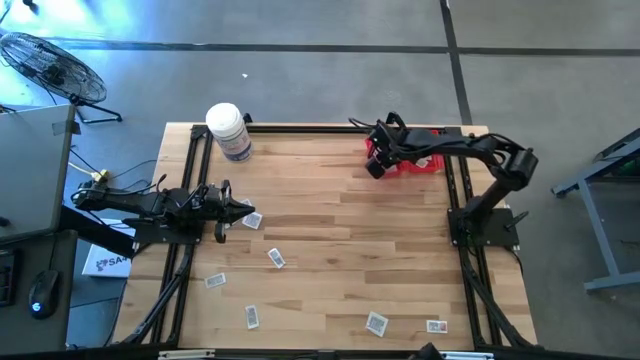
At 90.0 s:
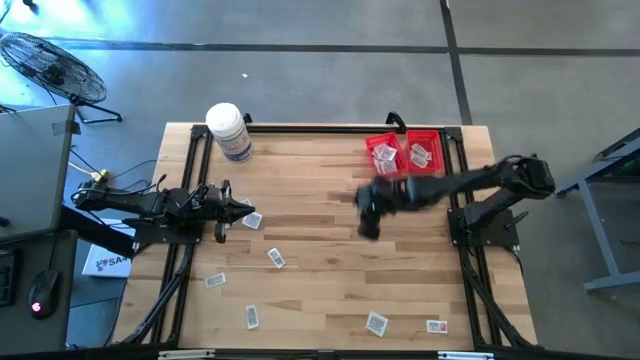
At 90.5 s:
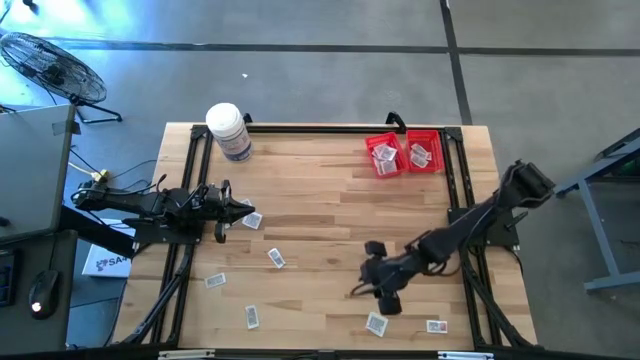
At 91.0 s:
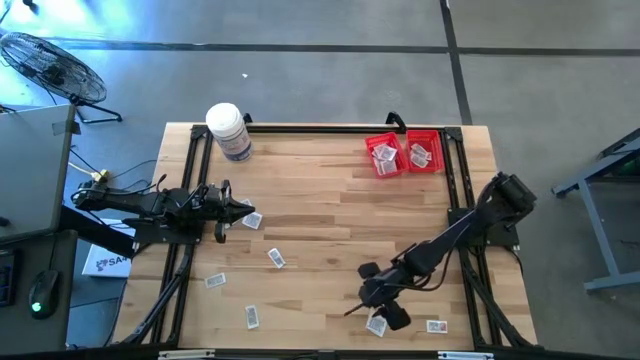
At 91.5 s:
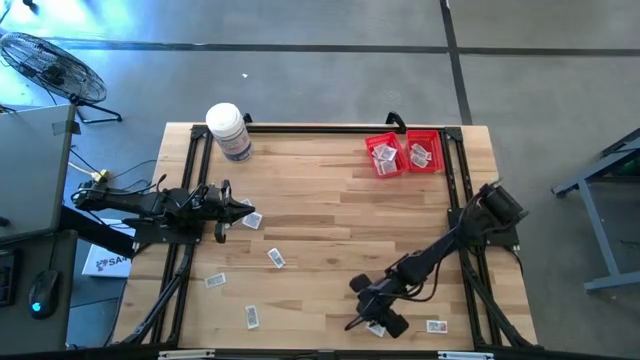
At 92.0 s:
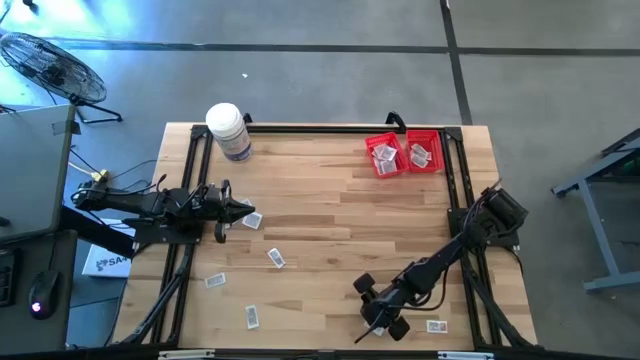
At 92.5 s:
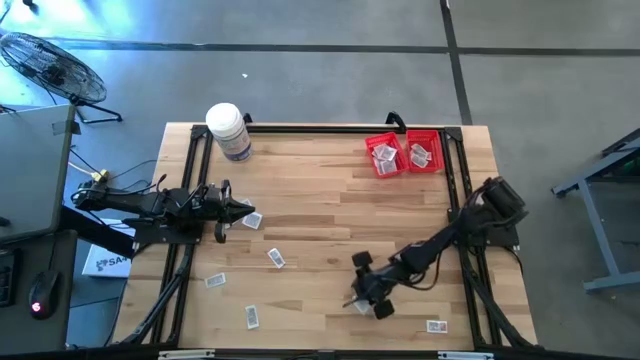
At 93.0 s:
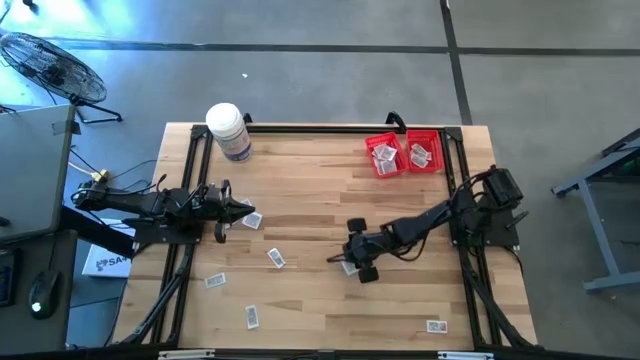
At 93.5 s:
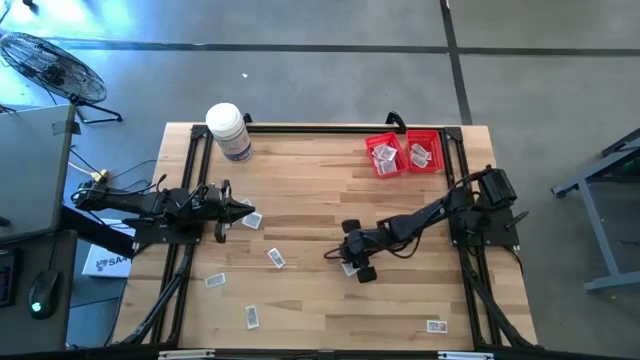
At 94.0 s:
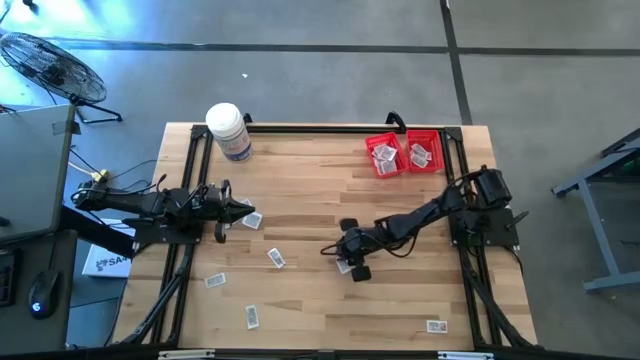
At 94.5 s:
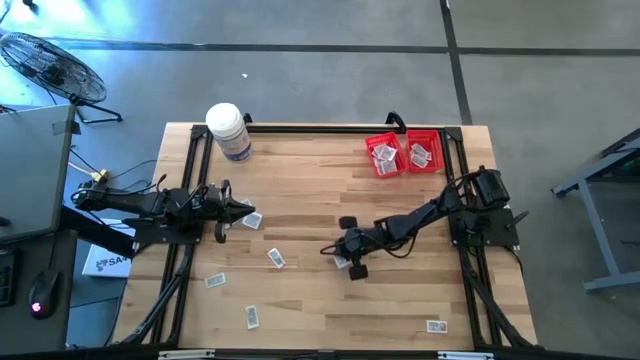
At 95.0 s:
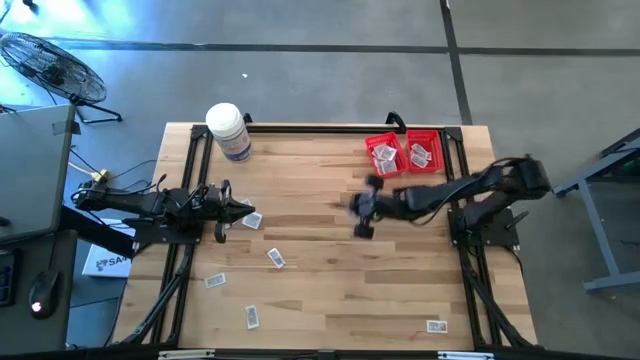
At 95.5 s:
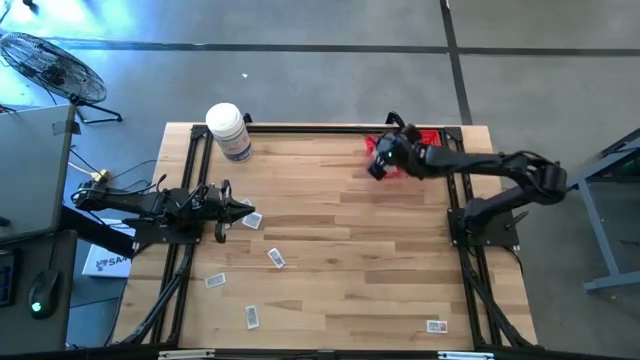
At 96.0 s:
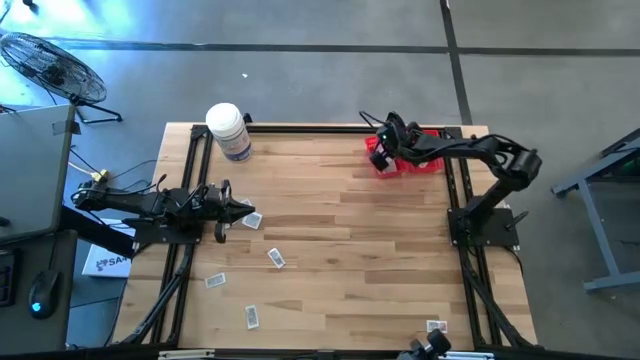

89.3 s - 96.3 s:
Task: Pick & Place First Aid Supplies
Put the towelette pack into the left red bin

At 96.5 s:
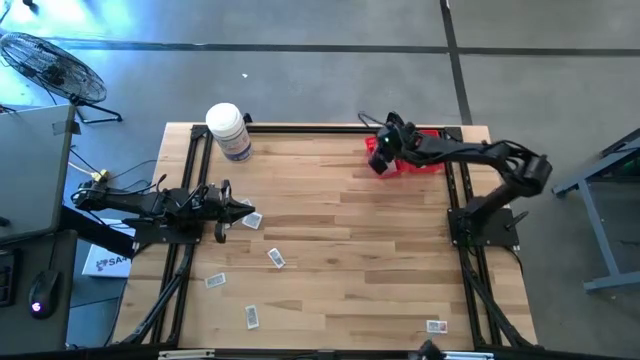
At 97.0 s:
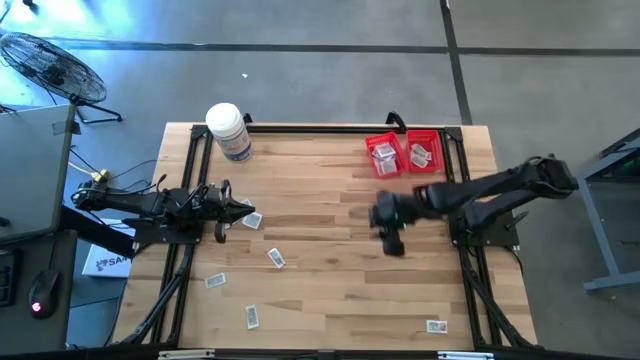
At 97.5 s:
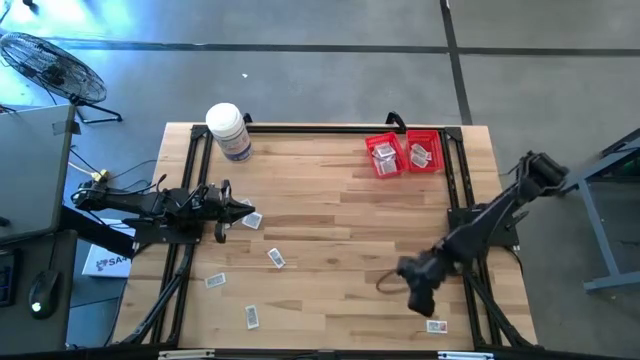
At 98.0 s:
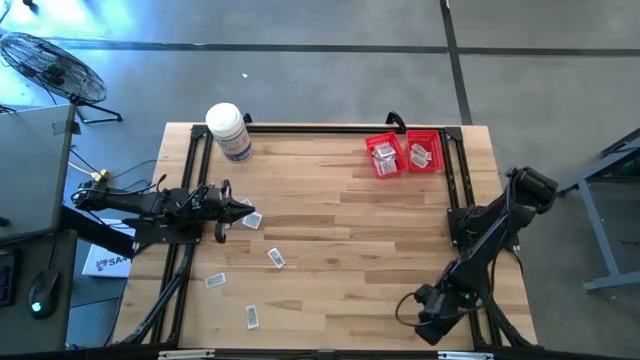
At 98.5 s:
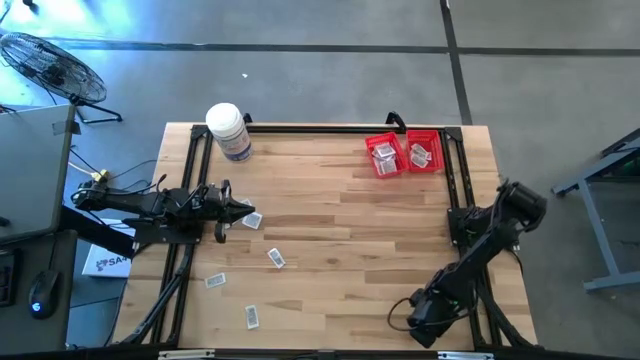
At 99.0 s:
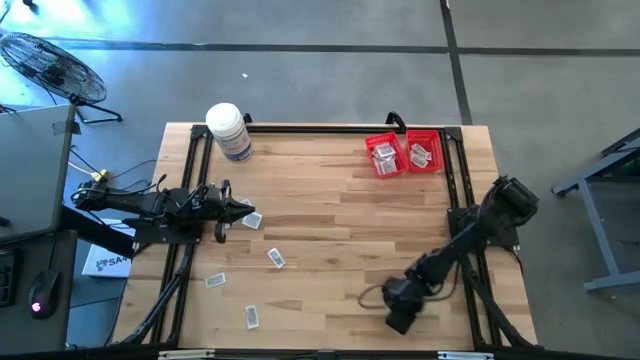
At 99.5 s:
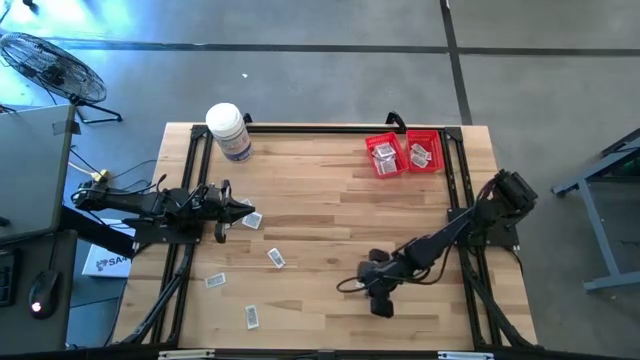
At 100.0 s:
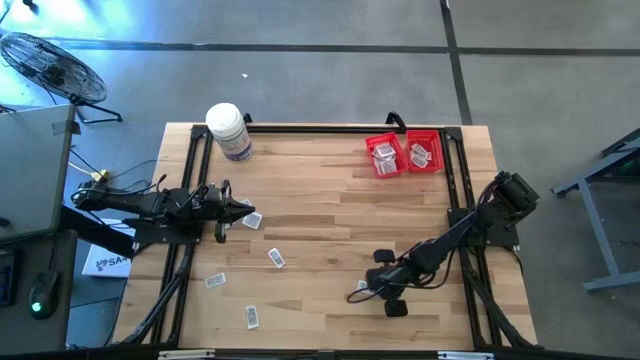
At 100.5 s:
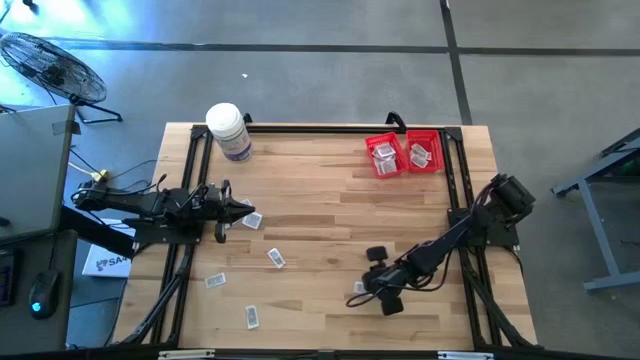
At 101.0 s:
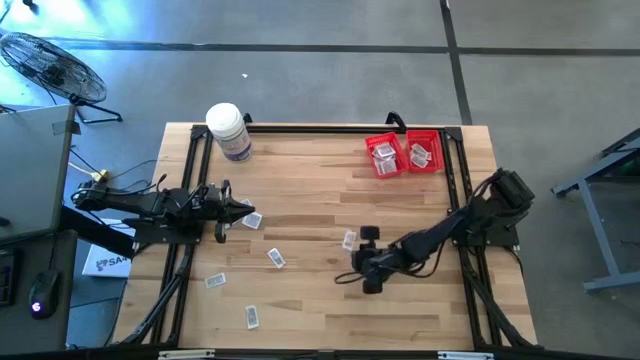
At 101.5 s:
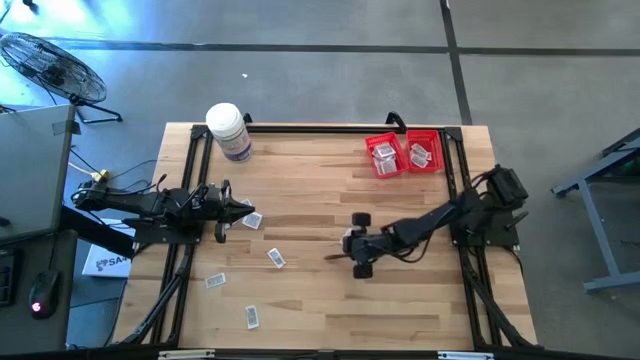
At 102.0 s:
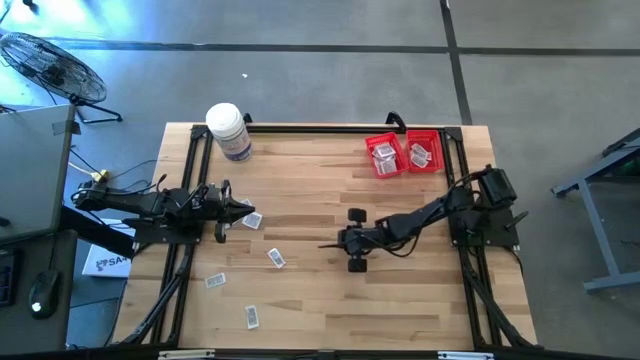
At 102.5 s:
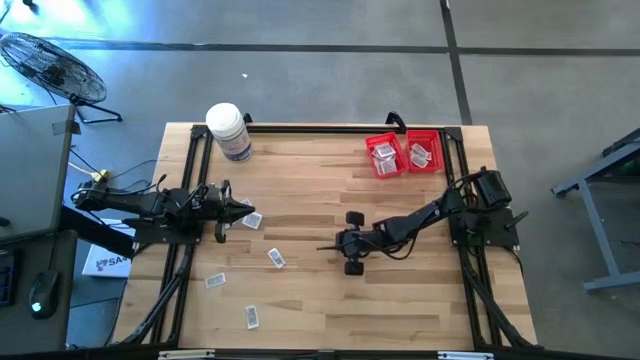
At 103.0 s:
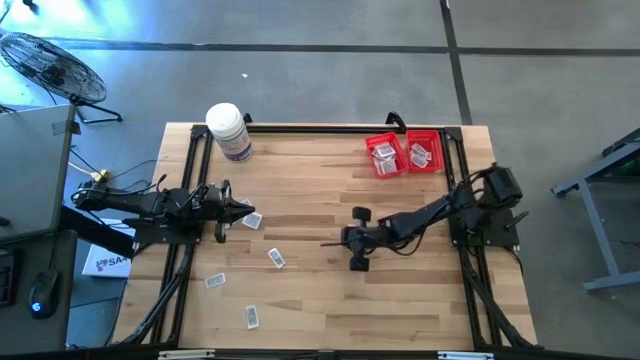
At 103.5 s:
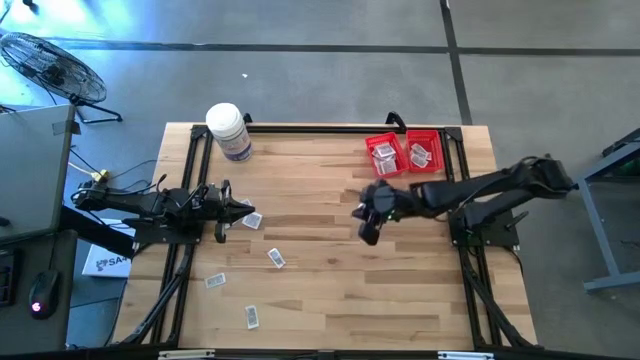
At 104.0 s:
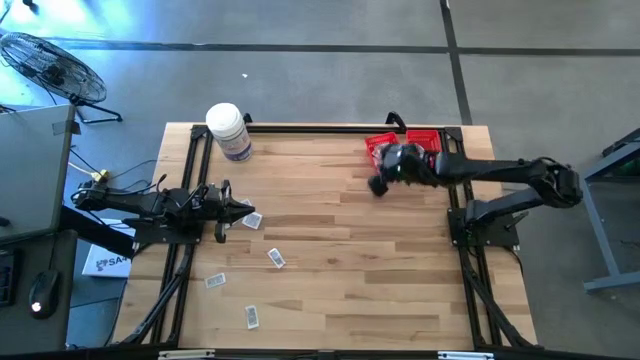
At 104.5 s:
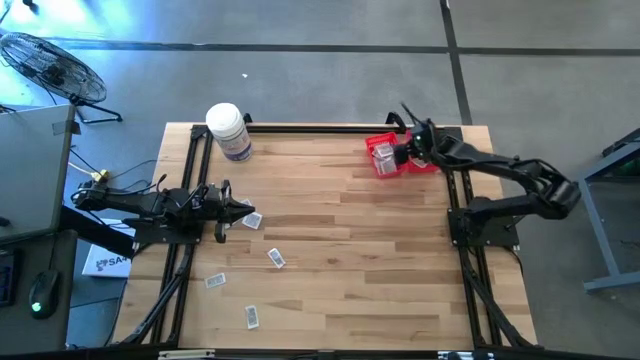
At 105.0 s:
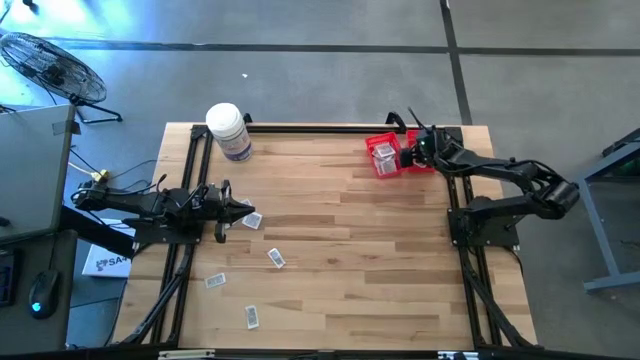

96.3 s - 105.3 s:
Put the ointment pack into the right red bin

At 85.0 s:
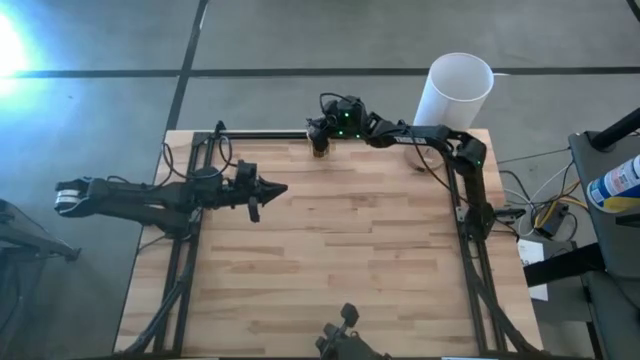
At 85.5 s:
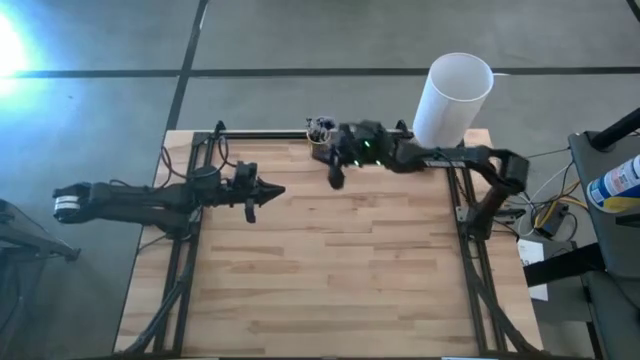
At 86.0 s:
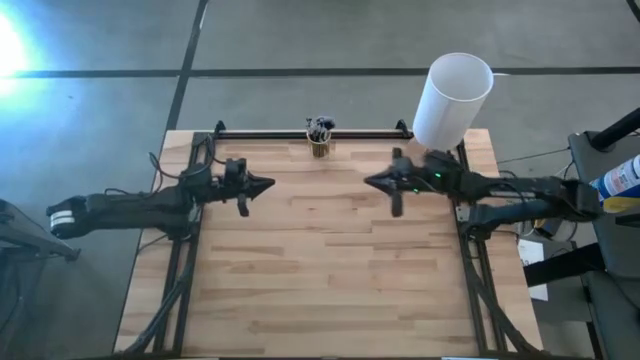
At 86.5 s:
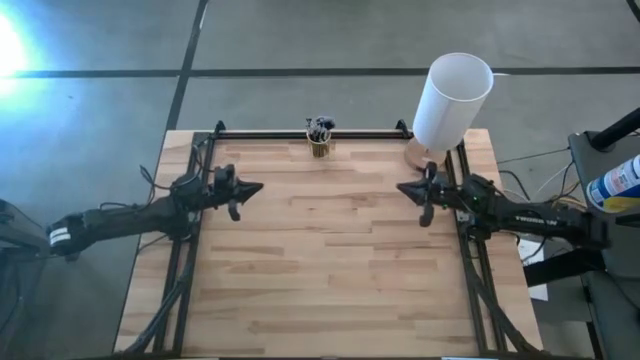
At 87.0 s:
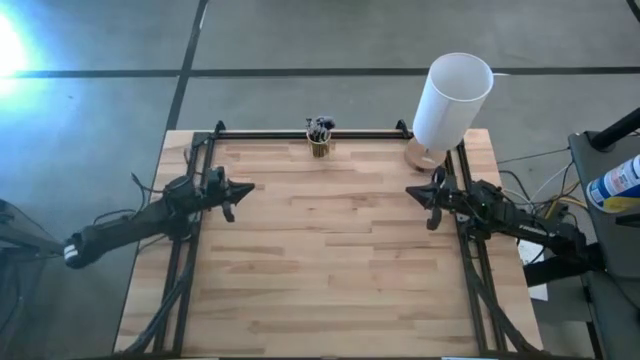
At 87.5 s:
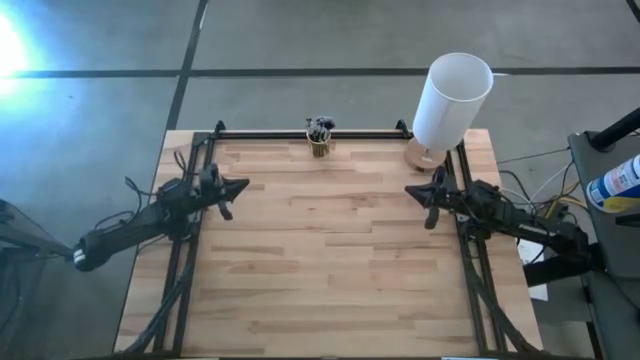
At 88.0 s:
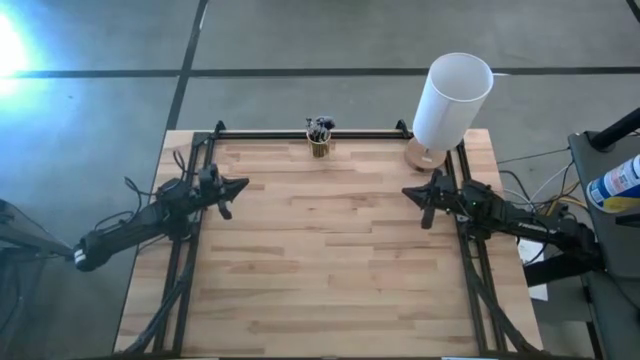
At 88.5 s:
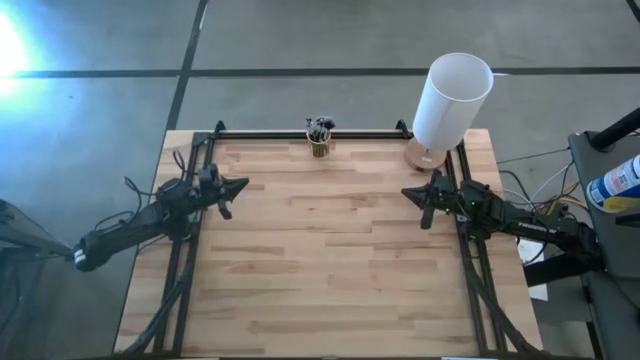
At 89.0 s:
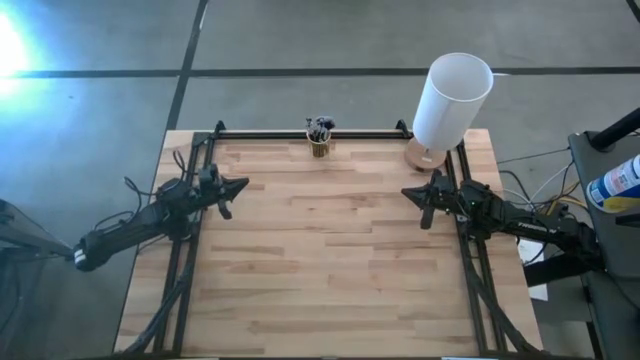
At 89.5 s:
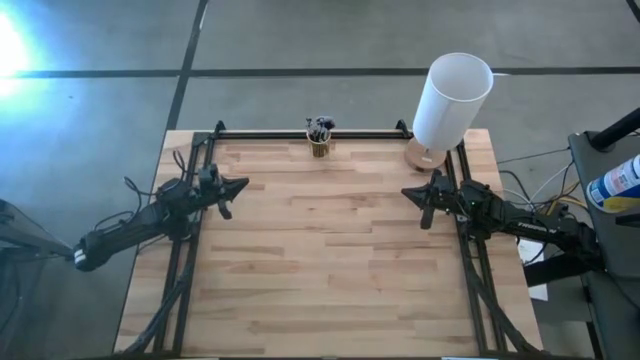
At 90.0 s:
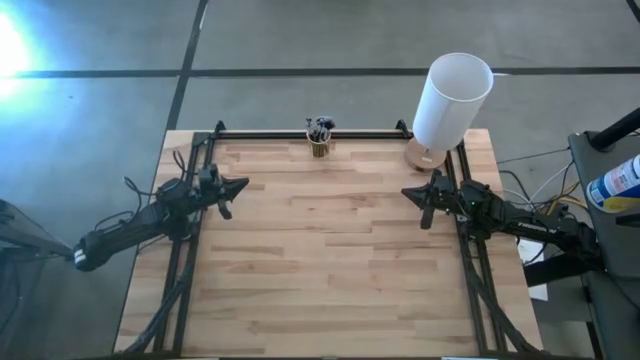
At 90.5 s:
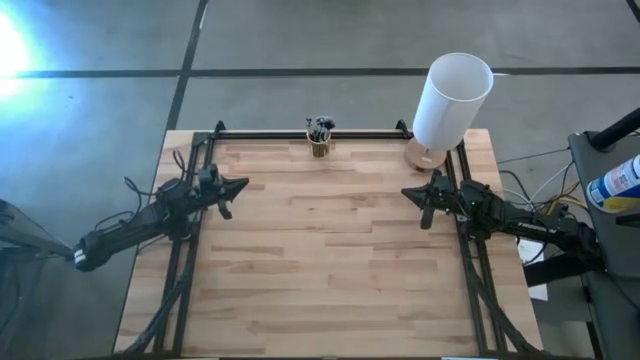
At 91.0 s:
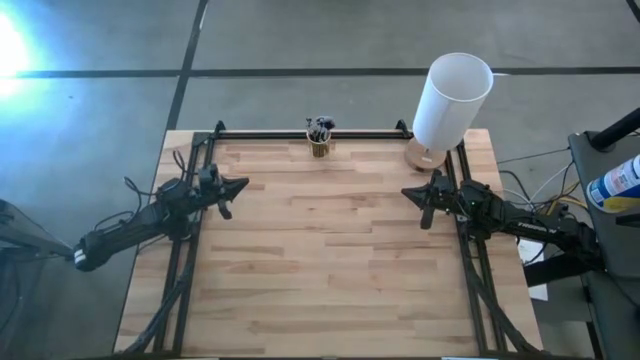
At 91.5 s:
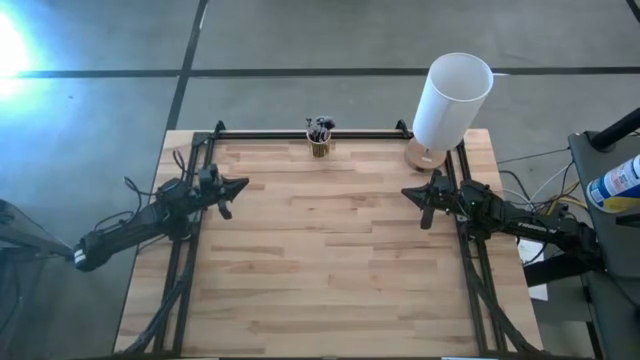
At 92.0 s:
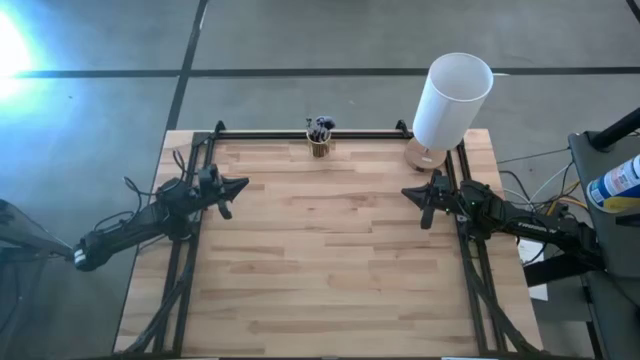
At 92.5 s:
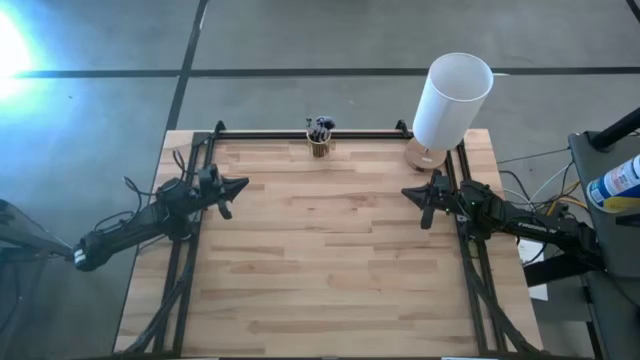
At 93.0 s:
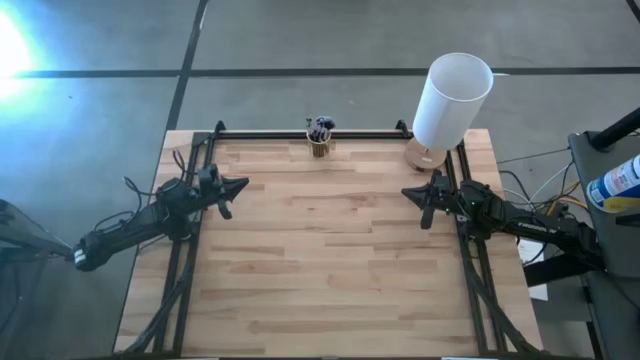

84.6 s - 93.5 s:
Task: Put items in baskets/containers
Return to Home Position
